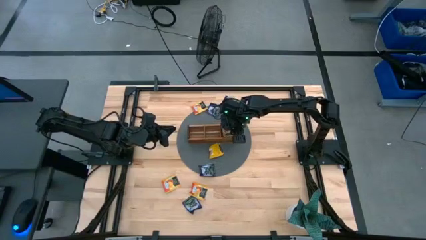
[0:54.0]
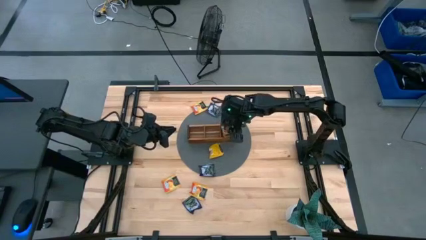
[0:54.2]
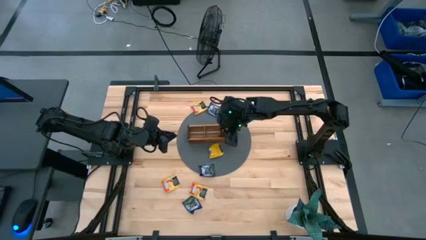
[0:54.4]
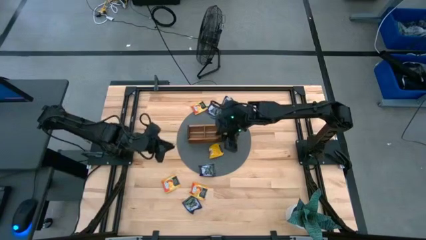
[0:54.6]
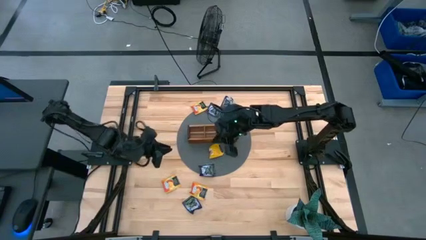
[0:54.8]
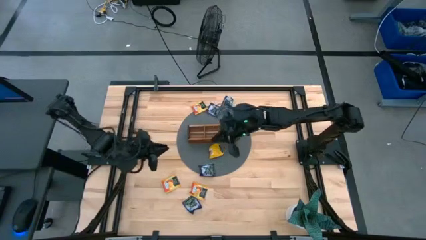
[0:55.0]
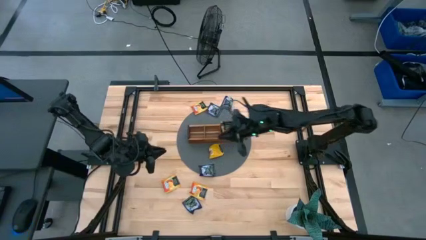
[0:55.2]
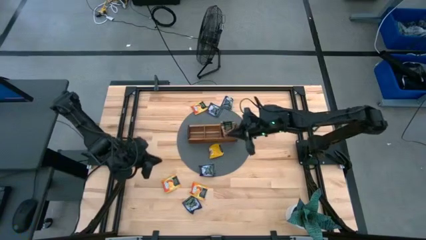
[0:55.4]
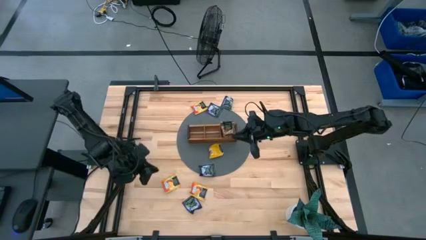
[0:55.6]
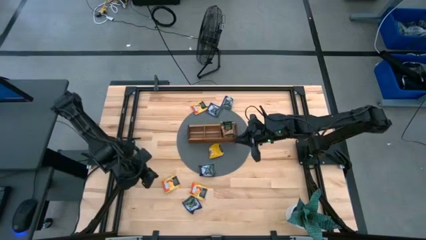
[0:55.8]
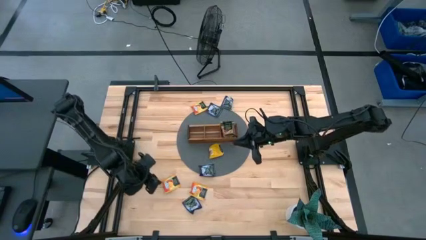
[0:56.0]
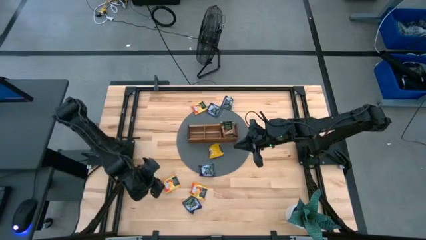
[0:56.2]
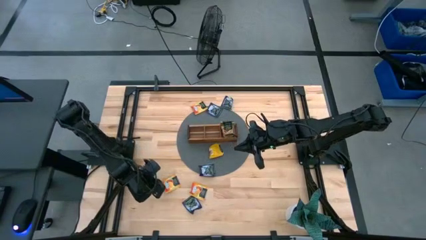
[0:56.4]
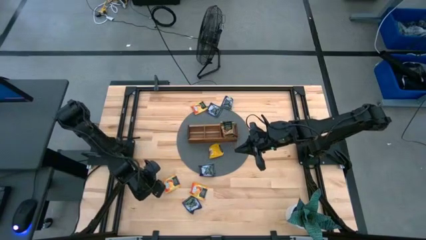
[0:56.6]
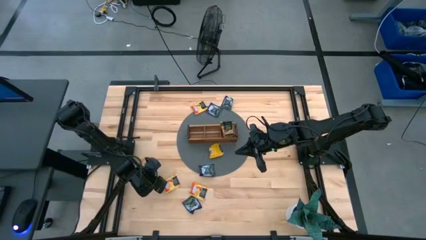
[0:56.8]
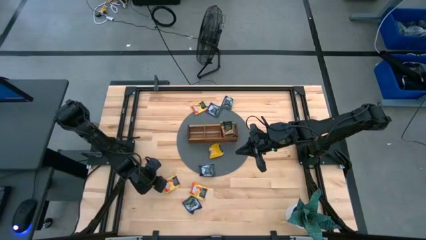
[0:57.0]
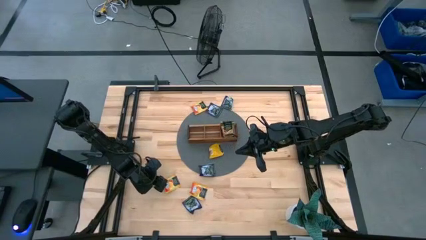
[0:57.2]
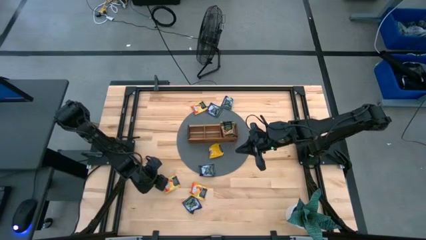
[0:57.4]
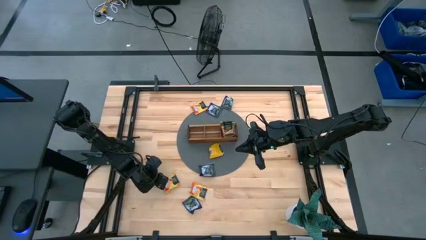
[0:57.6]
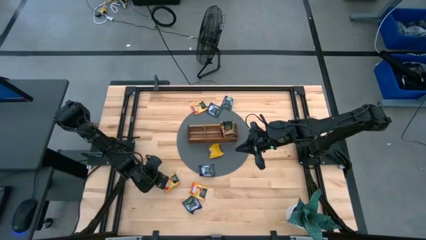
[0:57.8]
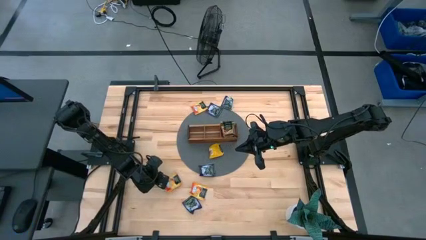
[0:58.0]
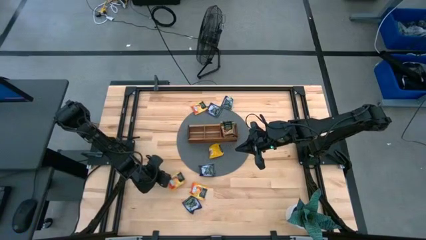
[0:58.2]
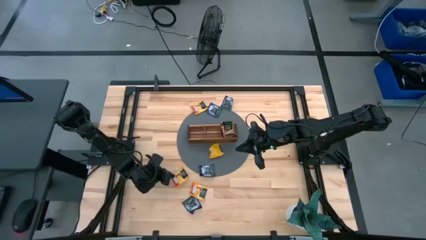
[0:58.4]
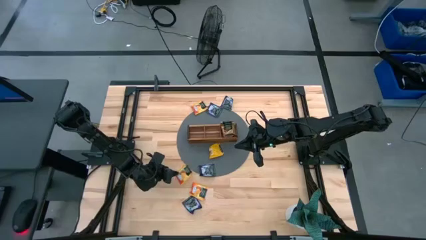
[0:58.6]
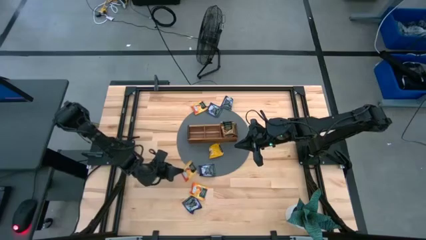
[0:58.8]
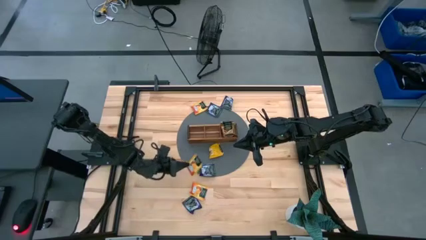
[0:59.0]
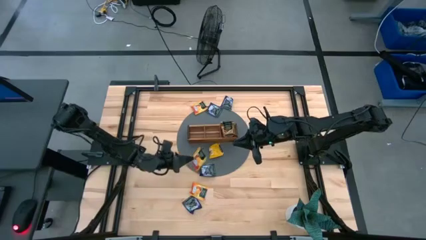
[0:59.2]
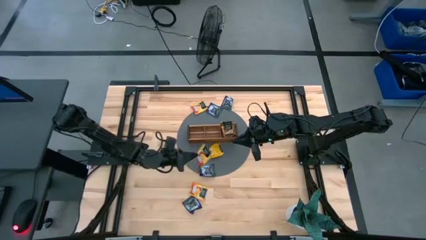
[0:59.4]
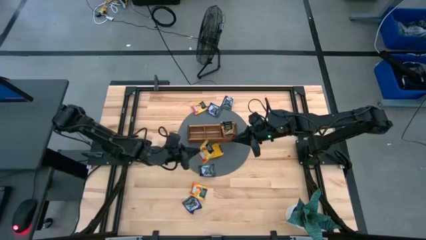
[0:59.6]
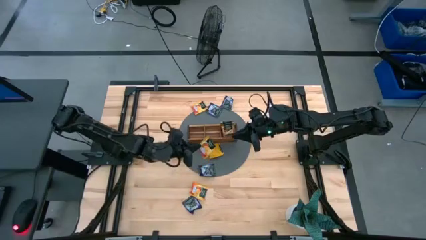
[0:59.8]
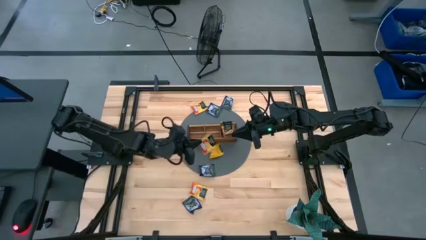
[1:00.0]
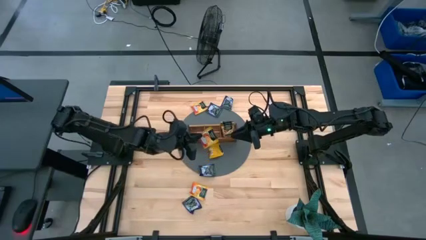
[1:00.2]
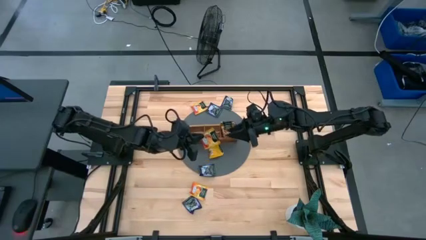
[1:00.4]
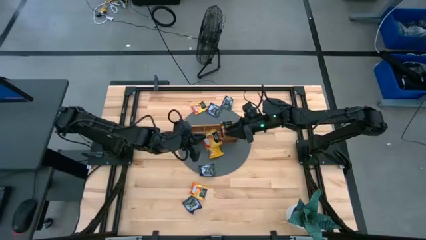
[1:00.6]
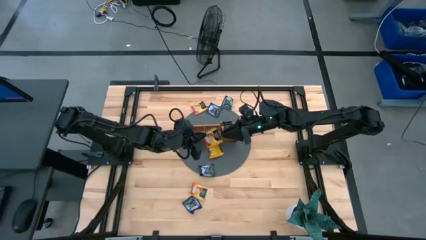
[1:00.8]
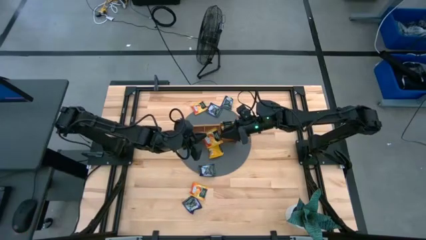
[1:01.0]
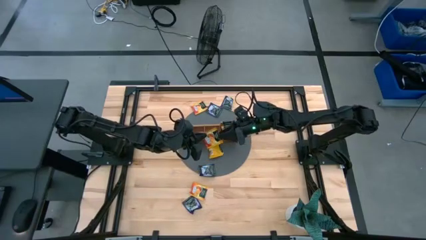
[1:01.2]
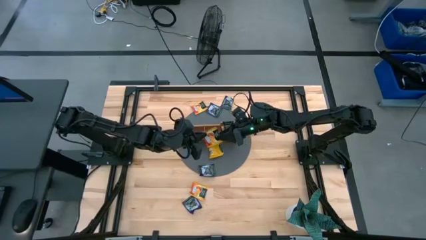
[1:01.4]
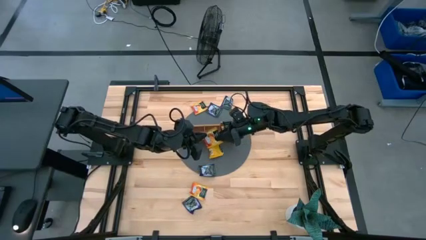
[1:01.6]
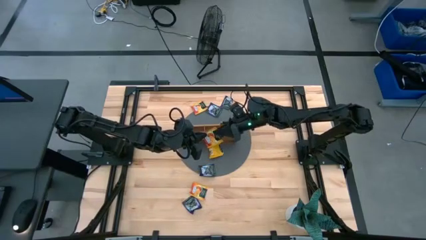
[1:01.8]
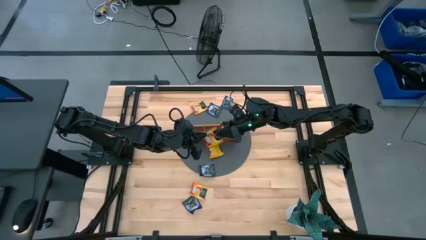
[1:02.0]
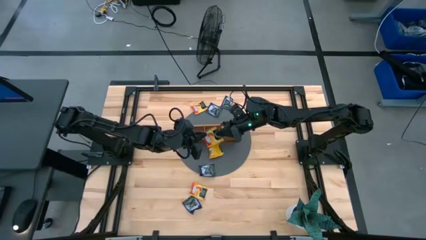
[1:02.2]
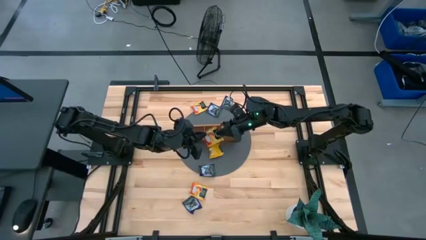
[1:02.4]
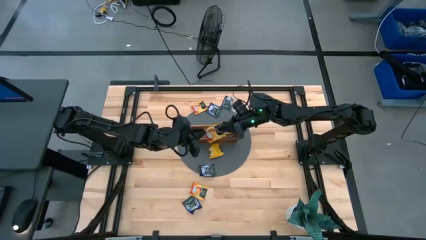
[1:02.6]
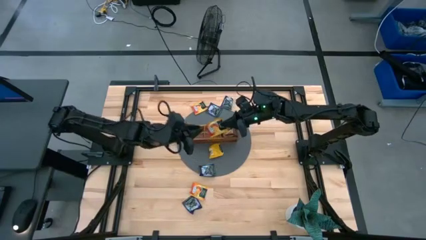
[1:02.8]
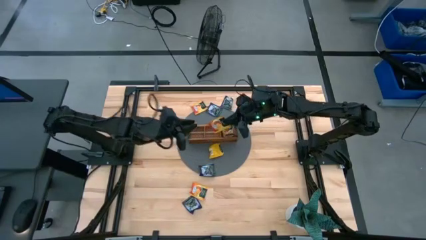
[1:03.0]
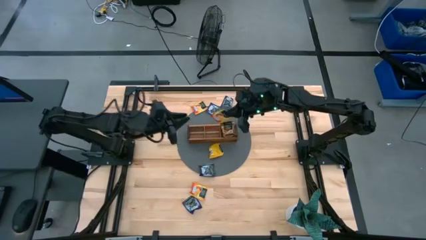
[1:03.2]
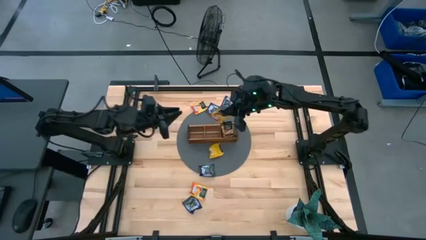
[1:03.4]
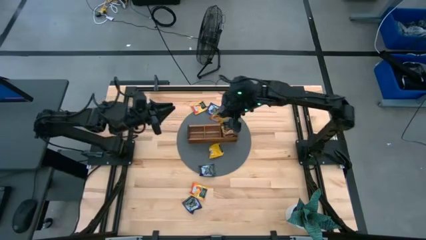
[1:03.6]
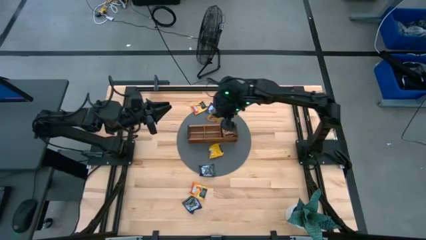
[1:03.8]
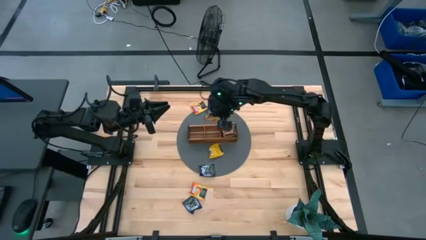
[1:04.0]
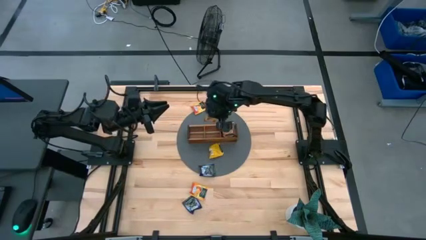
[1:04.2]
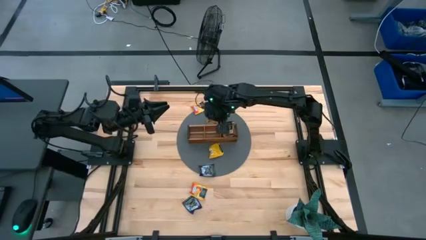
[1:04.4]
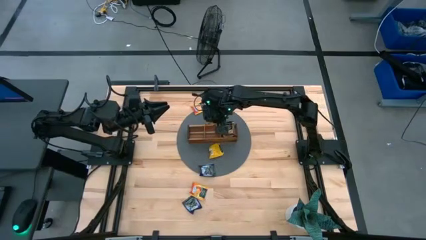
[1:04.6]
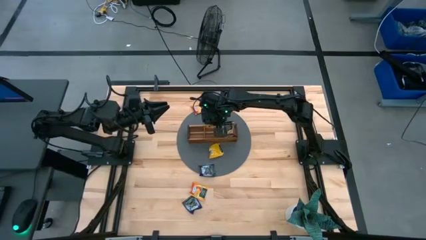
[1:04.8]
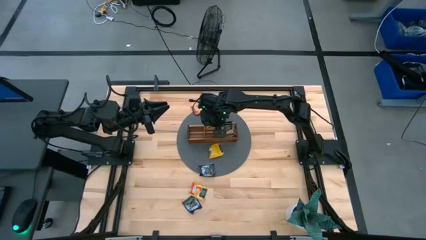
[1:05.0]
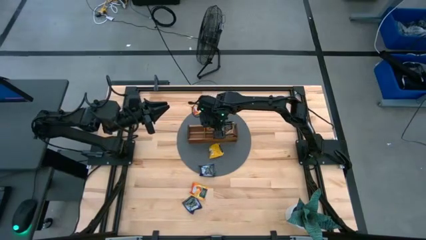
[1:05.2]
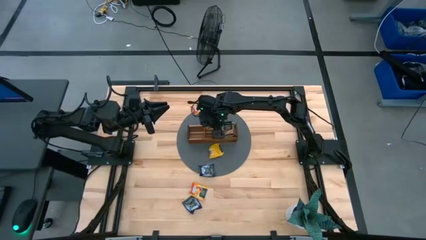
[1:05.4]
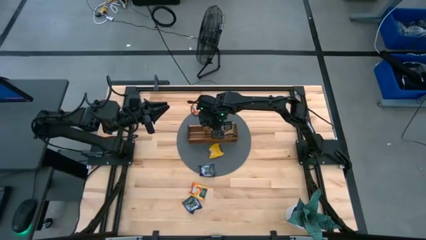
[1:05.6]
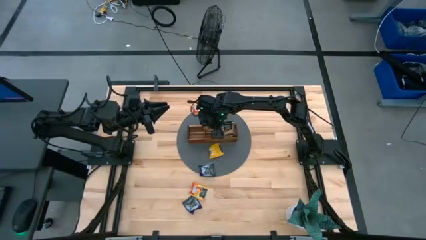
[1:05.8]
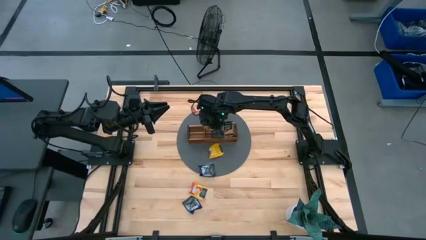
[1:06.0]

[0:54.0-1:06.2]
Task: Pick & Place Tea
Put the yellow tea bag into the middle section of the wooden organizer
